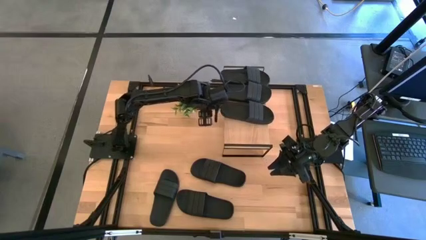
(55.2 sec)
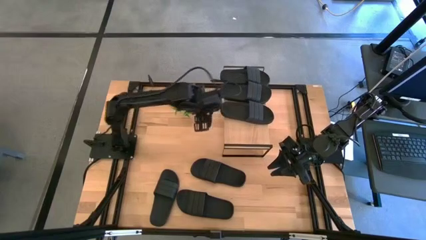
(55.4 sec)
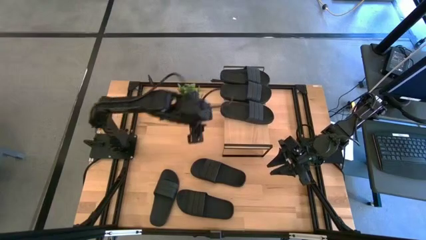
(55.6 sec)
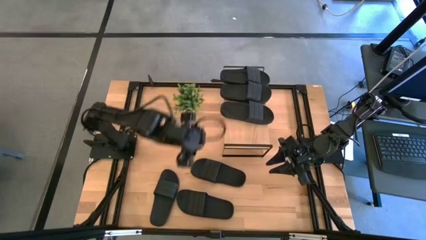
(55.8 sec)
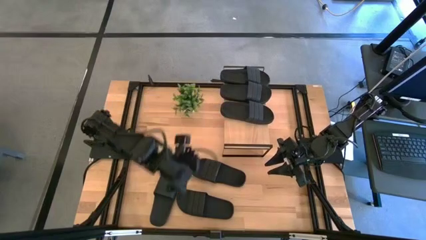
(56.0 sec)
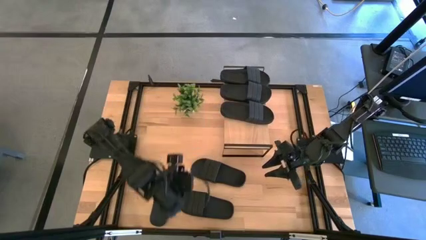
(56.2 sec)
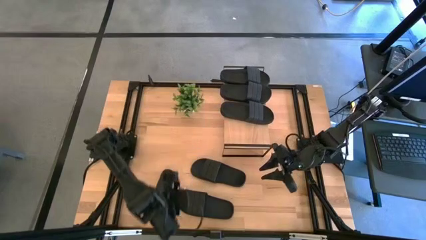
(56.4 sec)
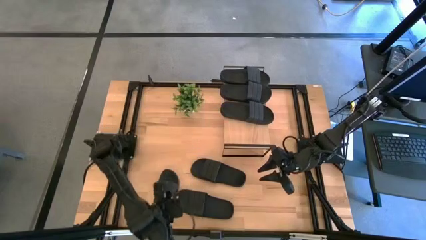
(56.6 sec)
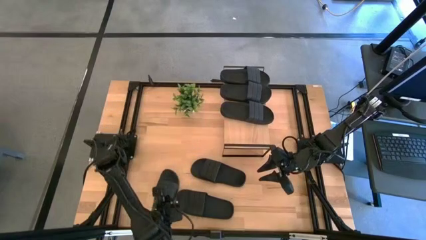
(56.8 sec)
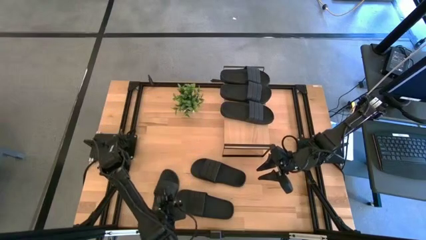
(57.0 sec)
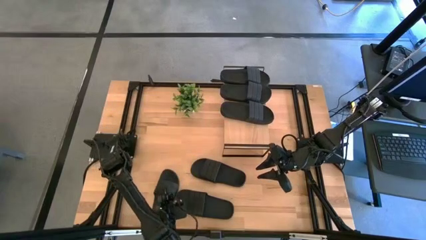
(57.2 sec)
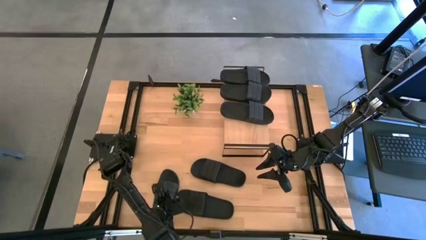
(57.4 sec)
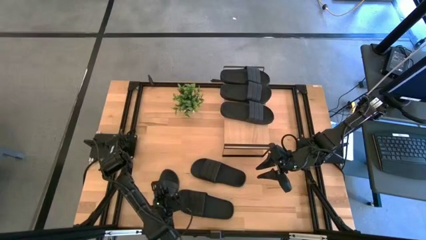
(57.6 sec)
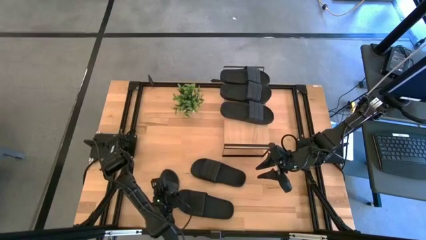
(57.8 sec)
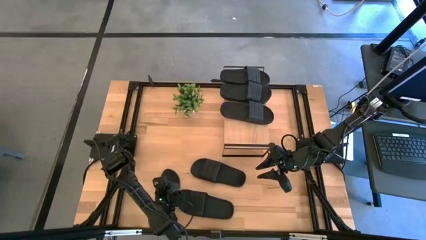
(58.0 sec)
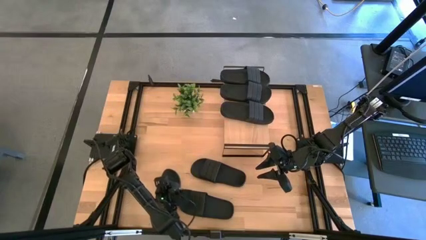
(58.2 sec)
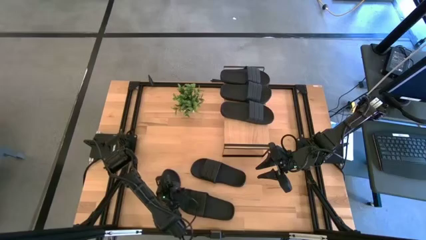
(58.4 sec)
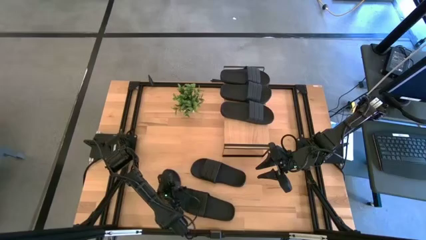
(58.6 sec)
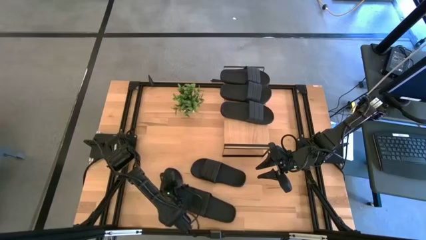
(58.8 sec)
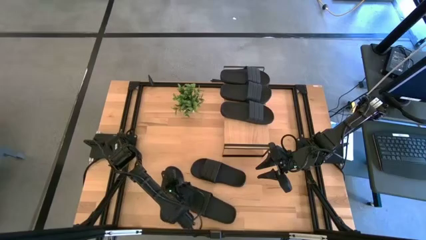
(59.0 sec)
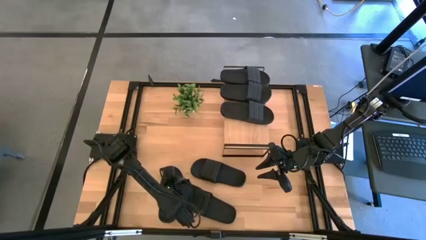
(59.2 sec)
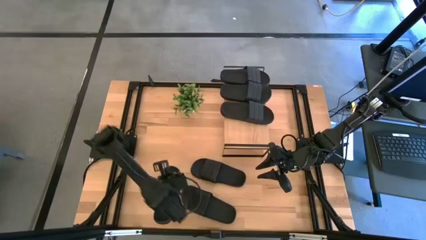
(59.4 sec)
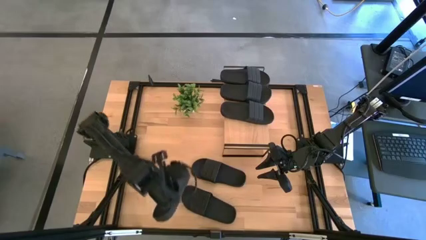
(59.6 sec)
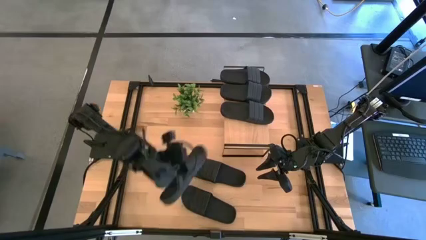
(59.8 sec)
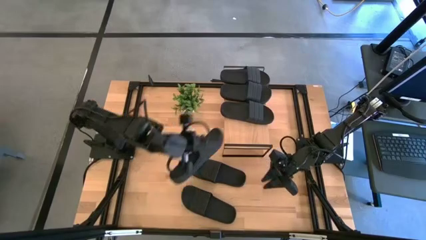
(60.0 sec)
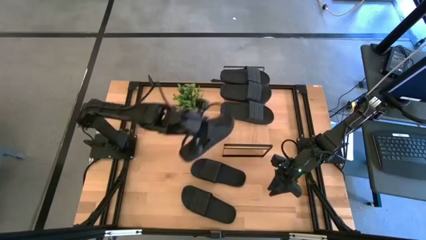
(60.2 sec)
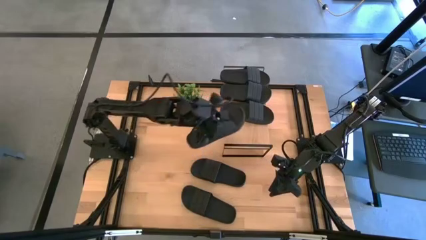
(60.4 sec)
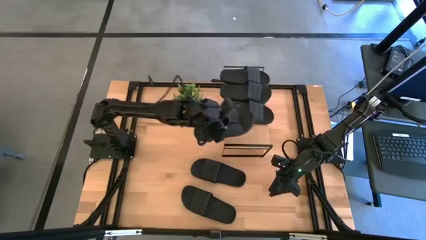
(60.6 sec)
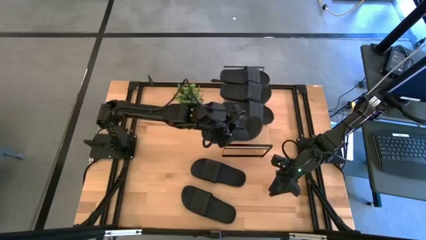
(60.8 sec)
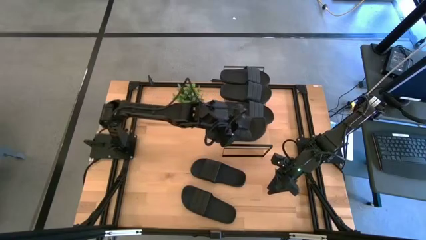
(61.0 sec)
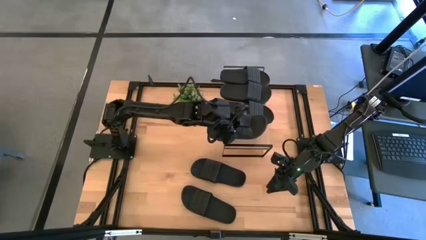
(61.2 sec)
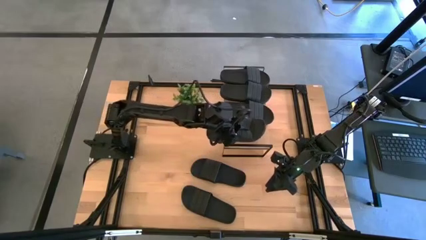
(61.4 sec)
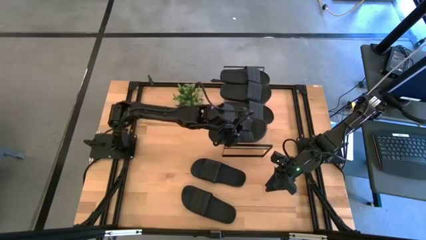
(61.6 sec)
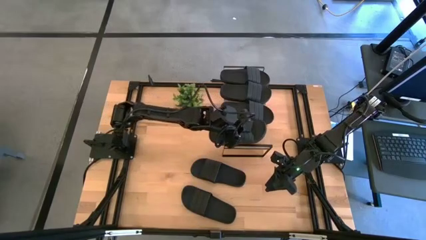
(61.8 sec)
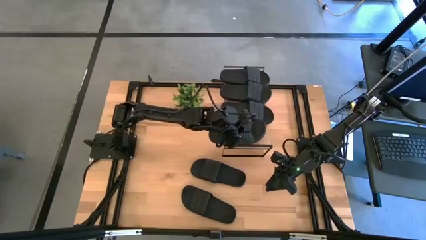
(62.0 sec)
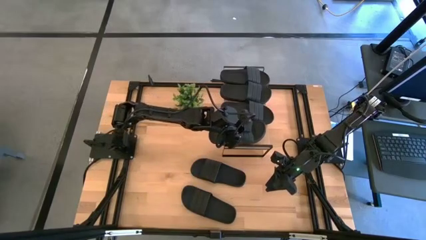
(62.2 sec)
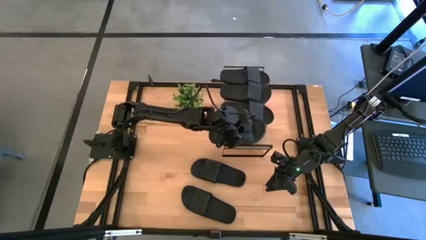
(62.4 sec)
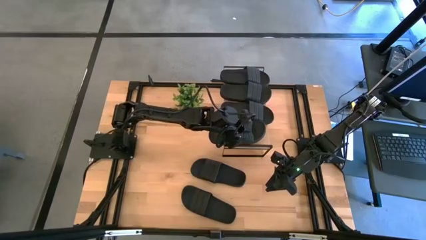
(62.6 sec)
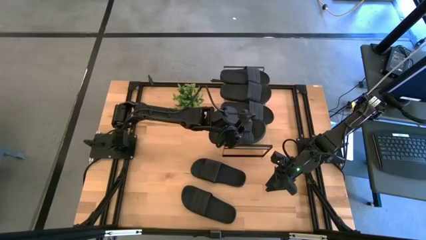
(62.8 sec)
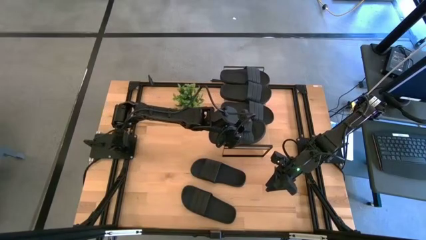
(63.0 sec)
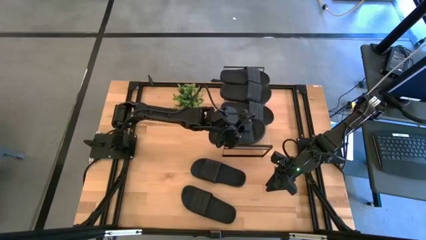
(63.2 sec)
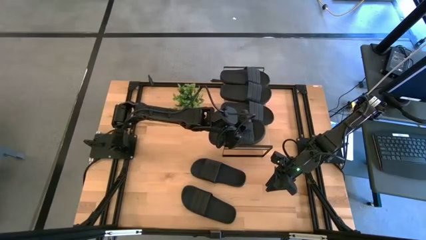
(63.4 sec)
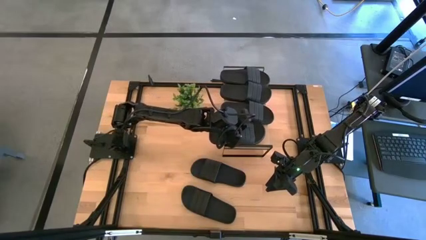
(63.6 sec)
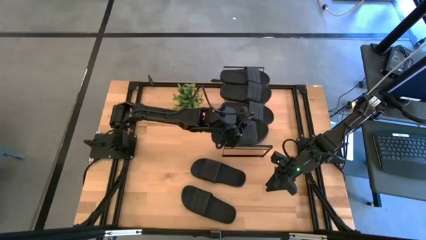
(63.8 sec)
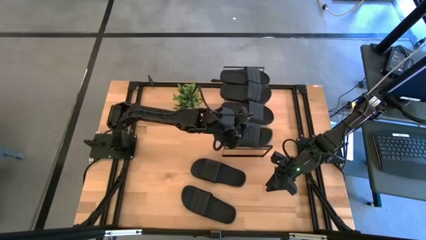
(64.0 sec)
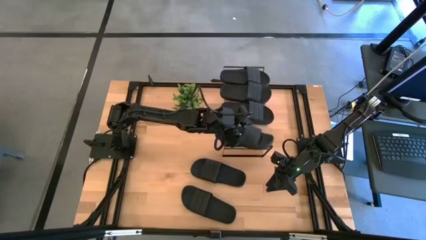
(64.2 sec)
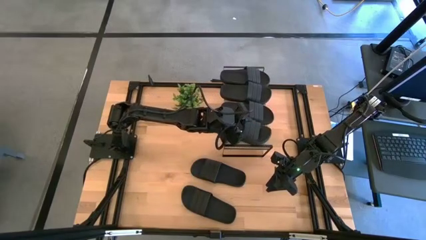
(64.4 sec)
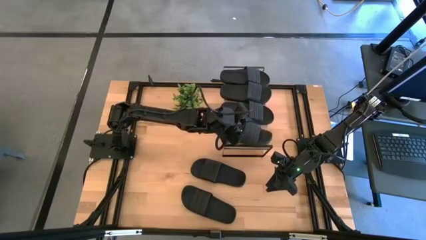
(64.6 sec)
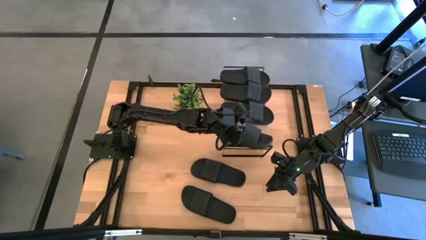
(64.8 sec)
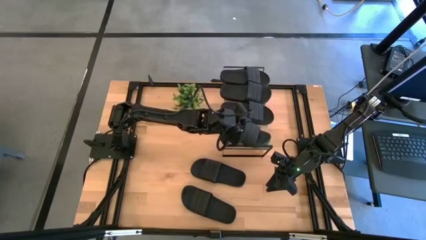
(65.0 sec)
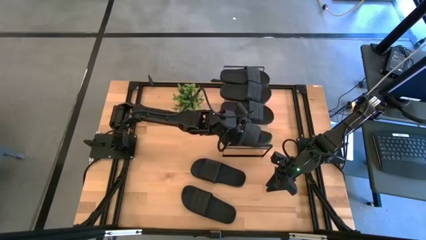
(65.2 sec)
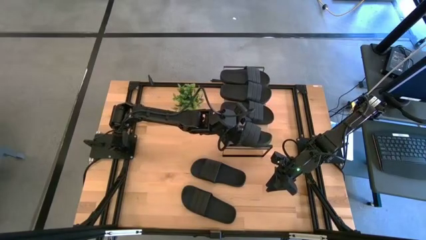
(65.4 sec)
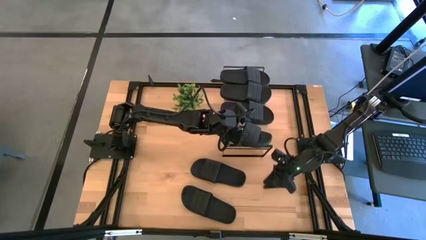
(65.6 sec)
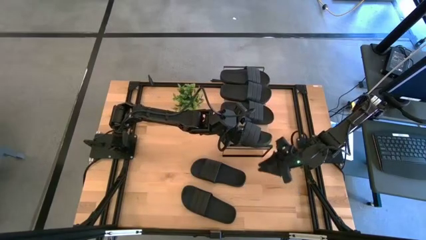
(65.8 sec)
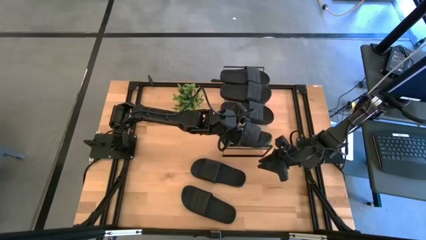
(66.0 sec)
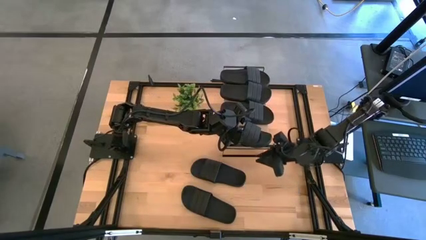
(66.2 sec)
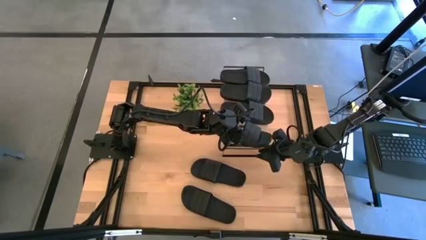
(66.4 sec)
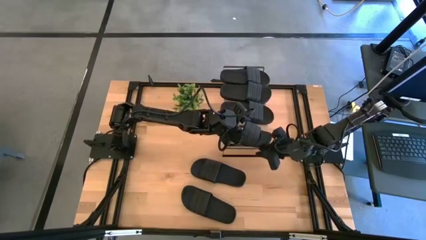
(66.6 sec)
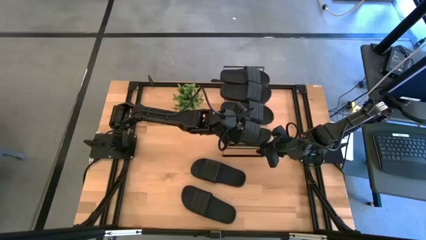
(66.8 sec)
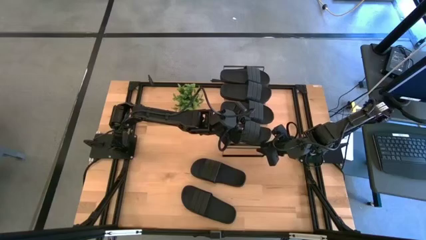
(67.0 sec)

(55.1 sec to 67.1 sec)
Task: Pick and place slides into the shelf
Put the black slide on the shelf
